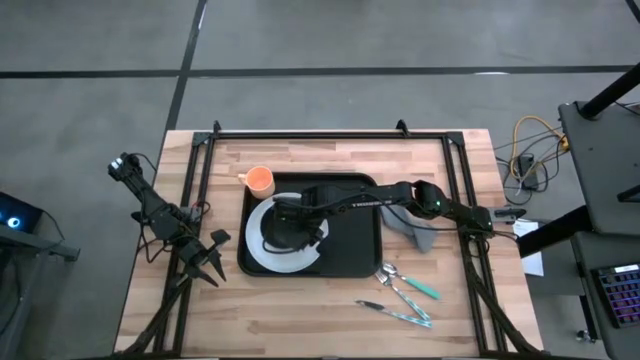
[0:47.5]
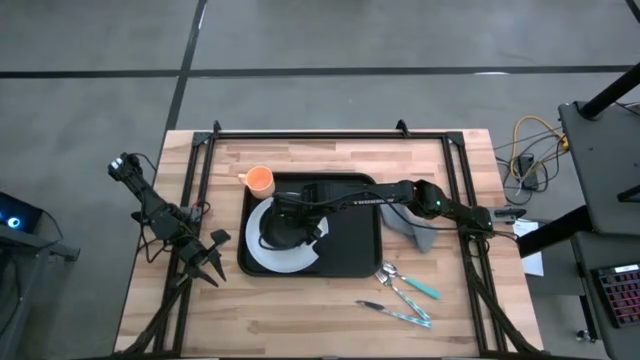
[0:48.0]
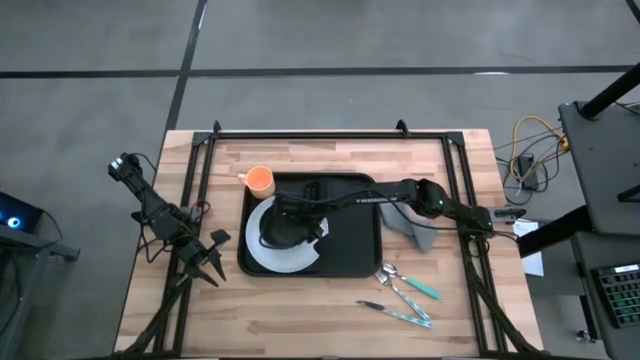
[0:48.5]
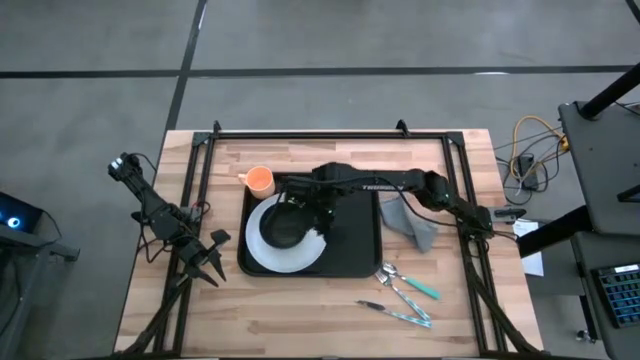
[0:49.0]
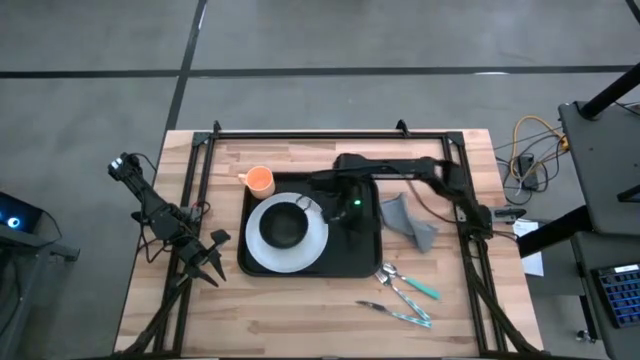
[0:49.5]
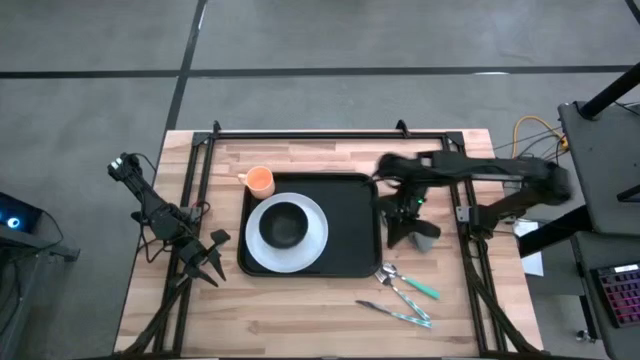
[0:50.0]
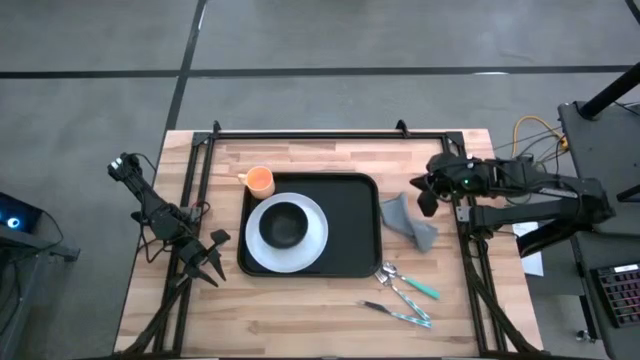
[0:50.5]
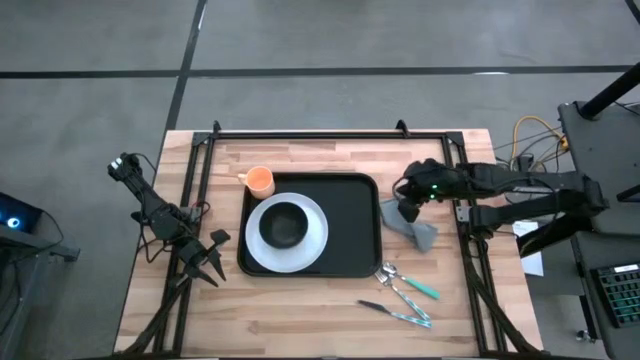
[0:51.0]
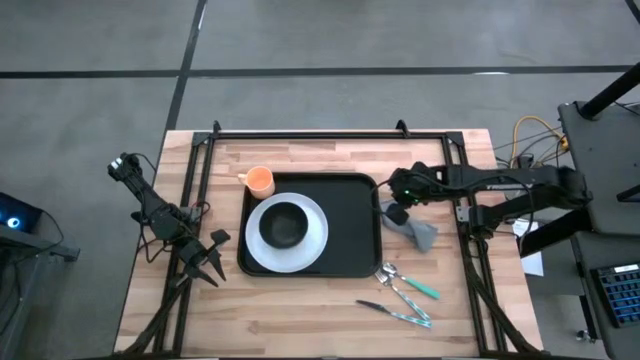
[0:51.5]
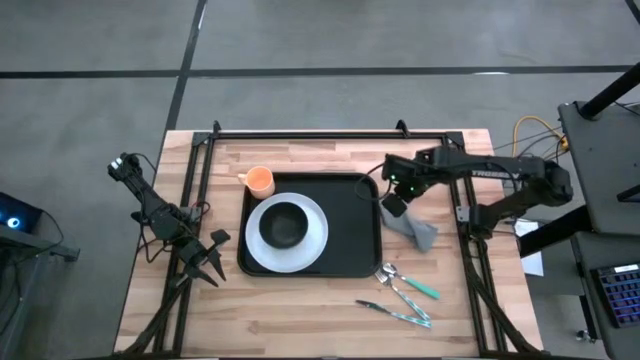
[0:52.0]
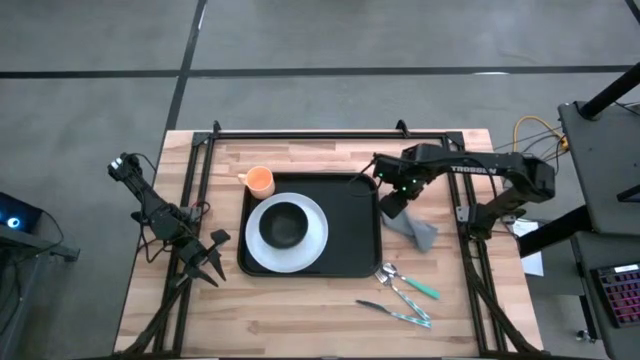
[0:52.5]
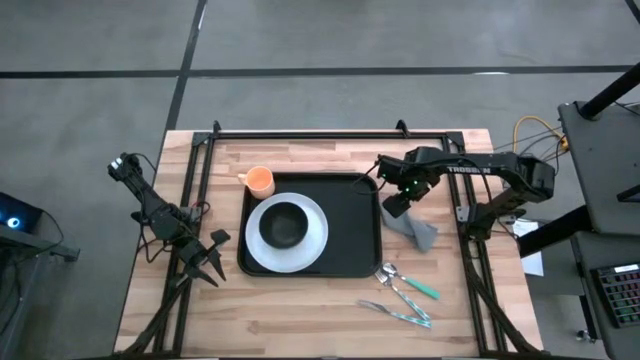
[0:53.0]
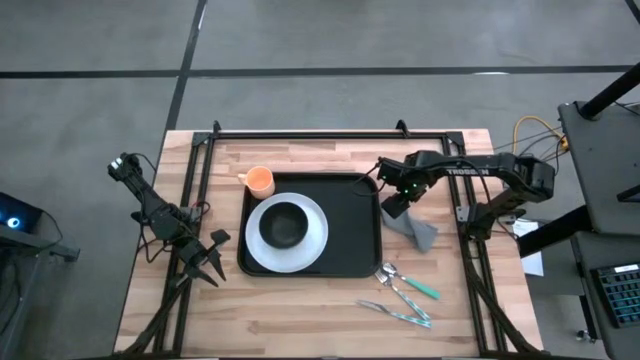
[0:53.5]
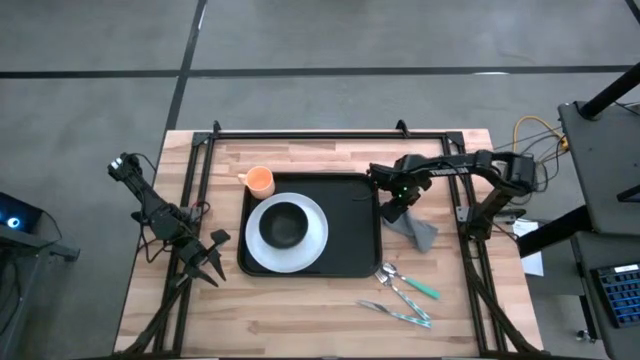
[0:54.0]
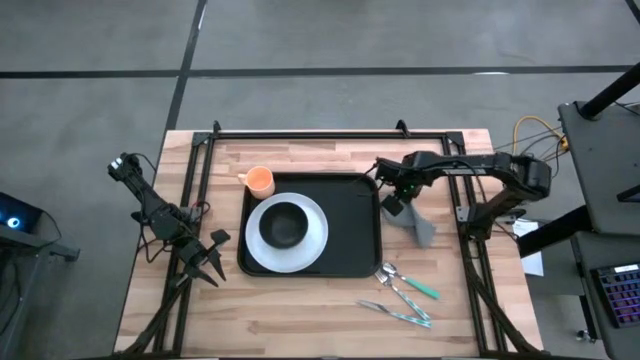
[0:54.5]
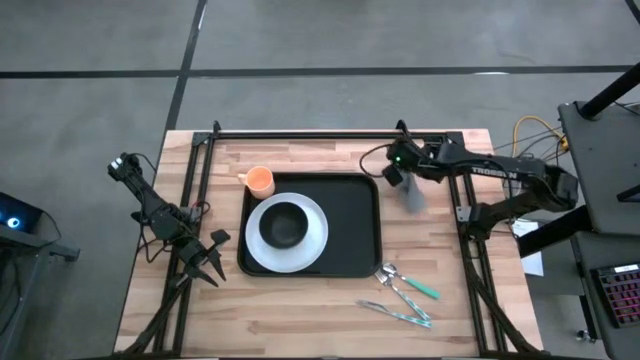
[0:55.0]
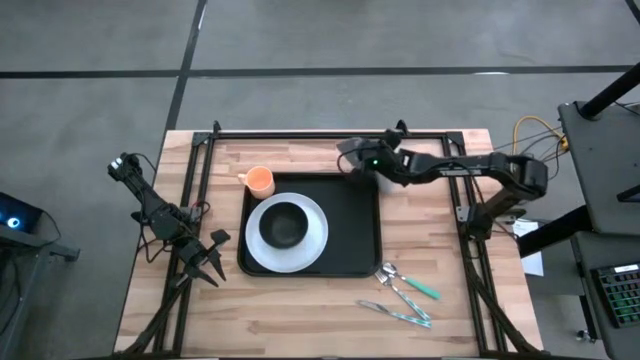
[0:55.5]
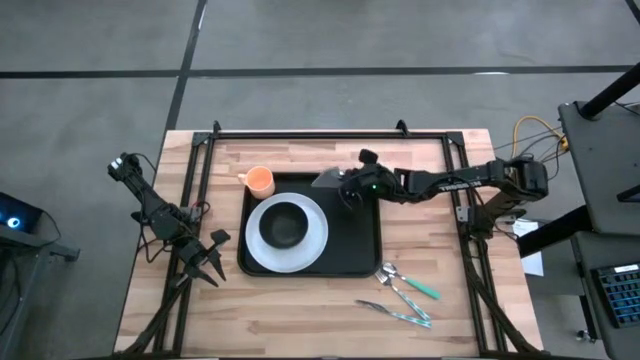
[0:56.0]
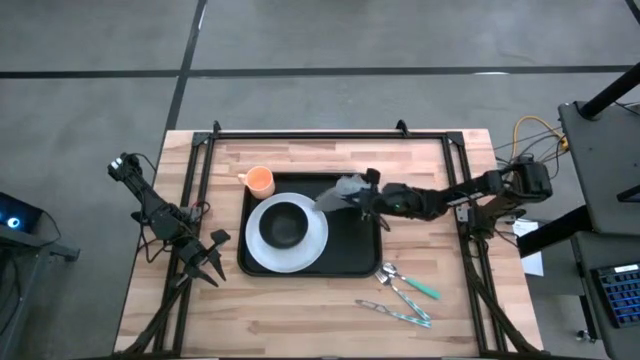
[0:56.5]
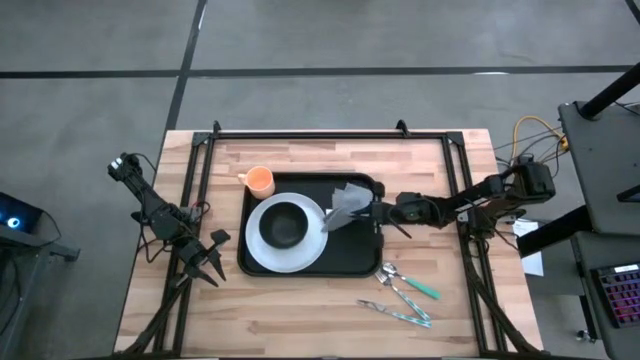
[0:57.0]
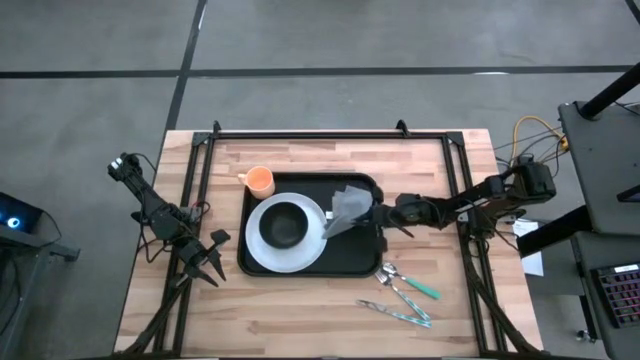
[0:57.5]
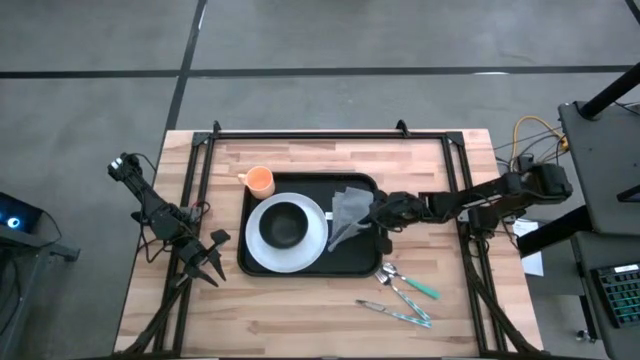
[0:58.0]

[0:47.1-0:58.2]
Task: Set up tray
Put the napkin on the tray to the right of the plate

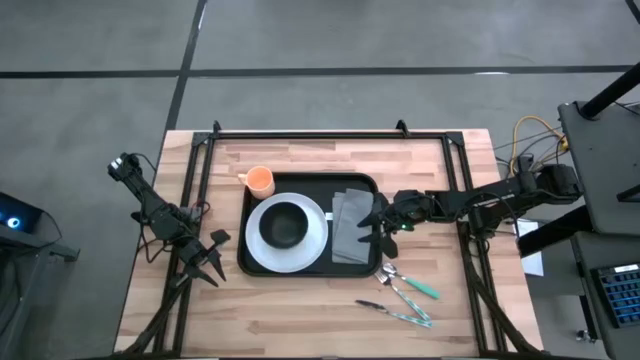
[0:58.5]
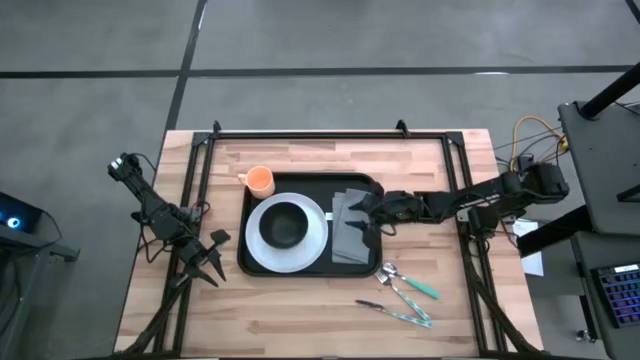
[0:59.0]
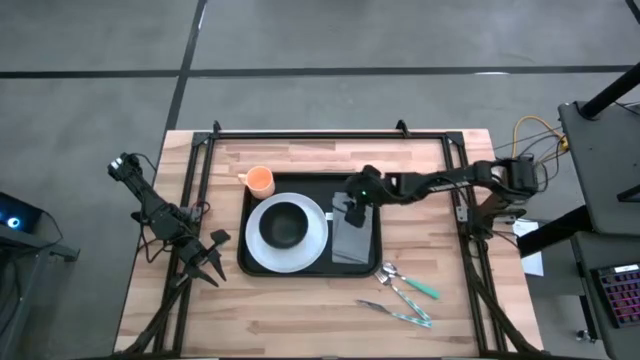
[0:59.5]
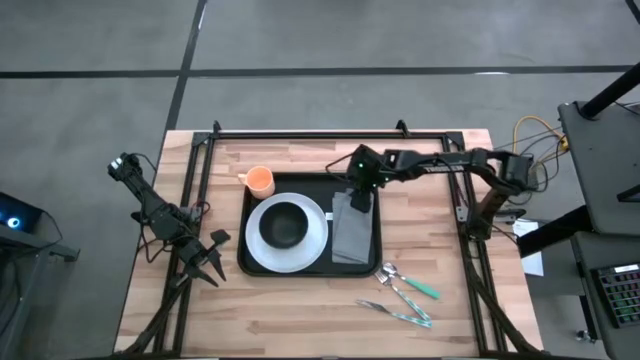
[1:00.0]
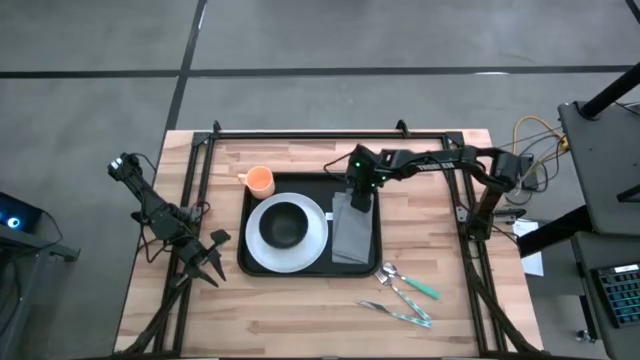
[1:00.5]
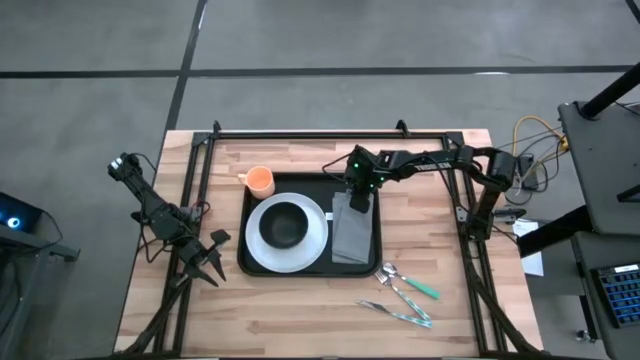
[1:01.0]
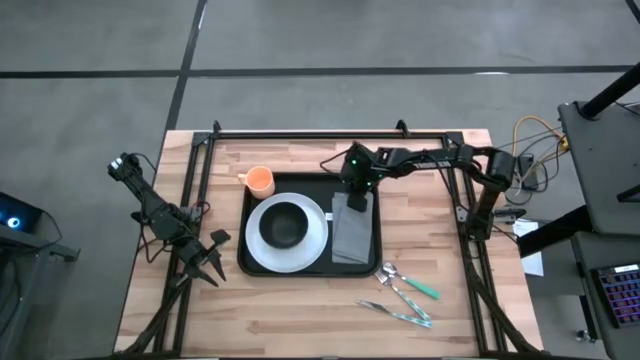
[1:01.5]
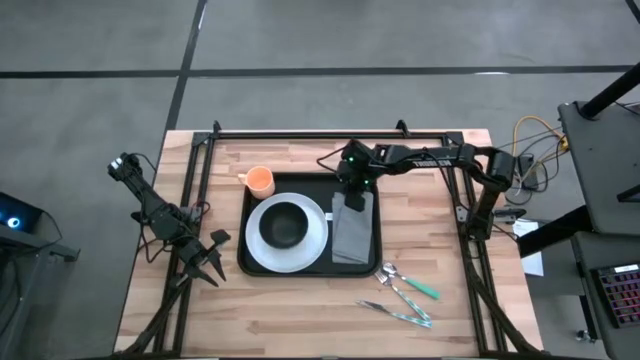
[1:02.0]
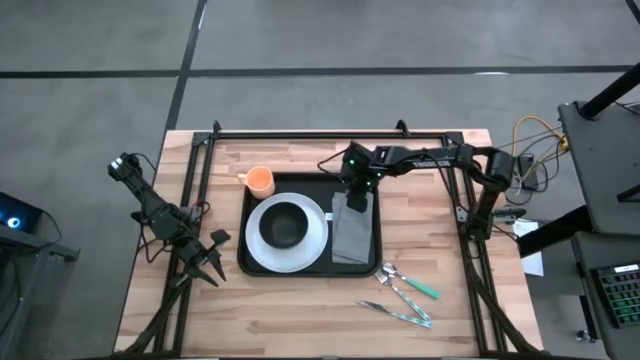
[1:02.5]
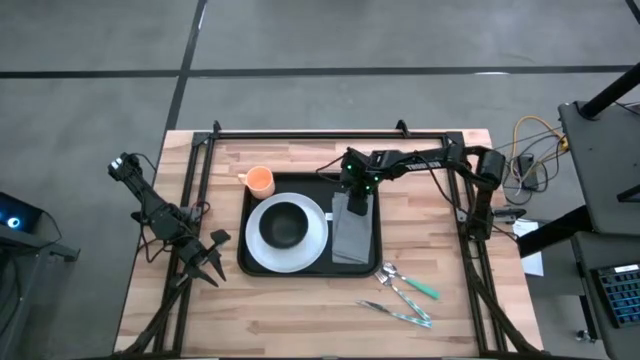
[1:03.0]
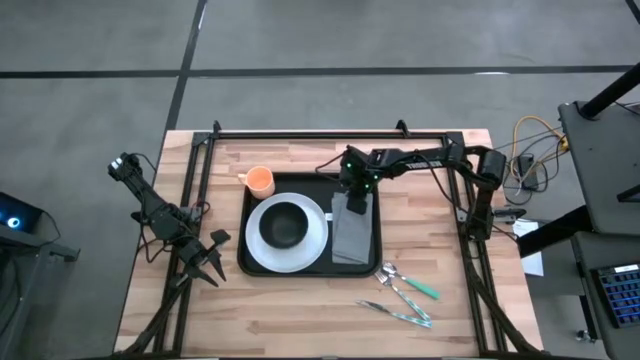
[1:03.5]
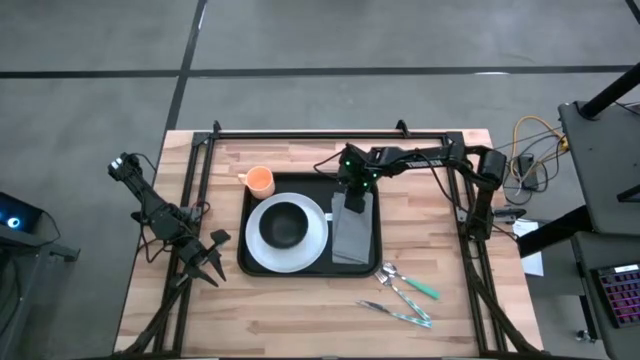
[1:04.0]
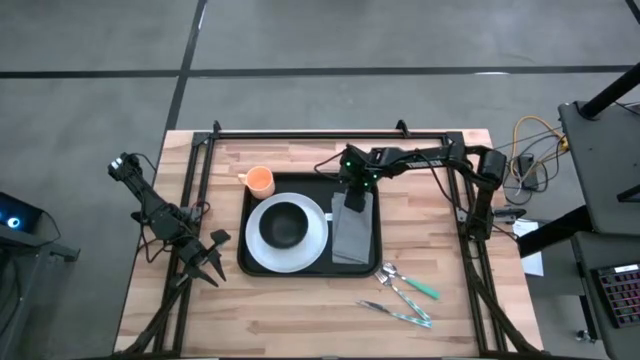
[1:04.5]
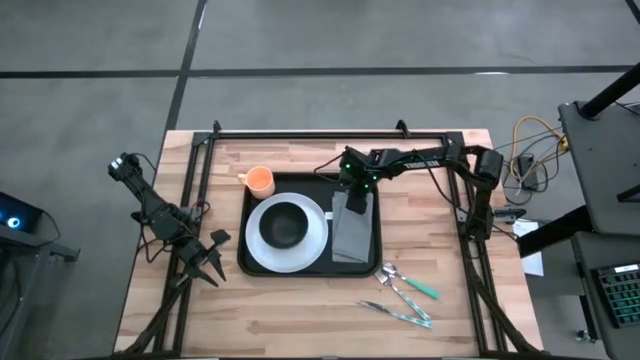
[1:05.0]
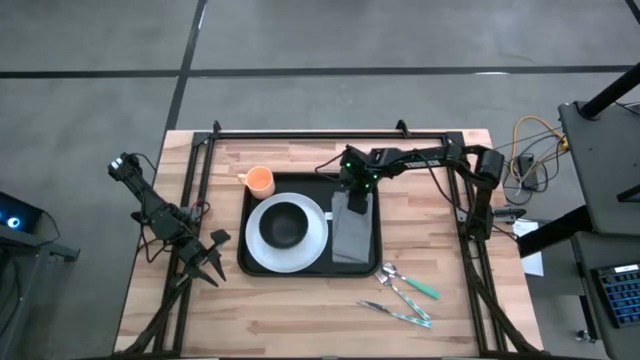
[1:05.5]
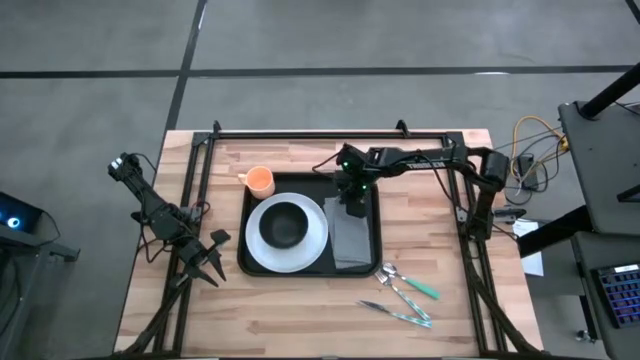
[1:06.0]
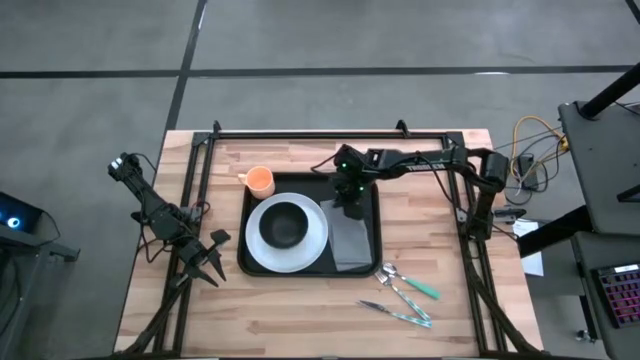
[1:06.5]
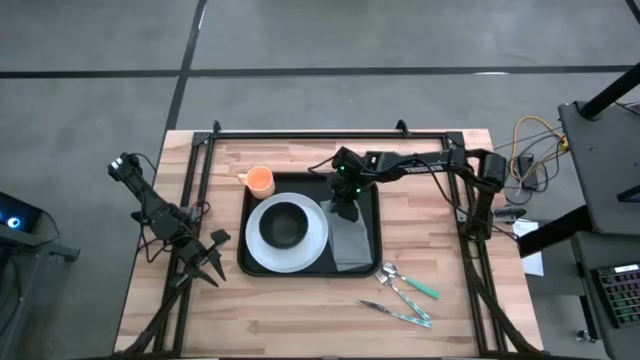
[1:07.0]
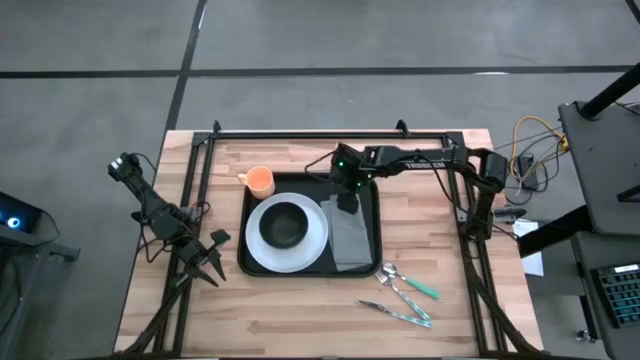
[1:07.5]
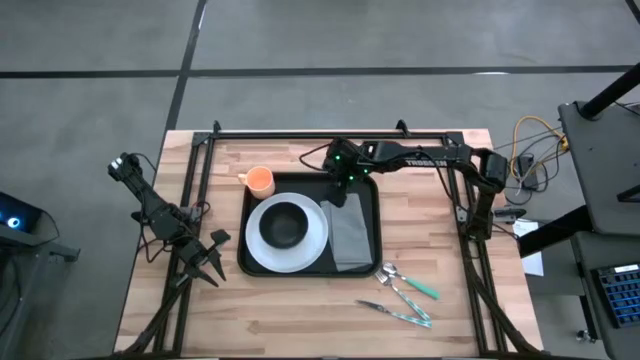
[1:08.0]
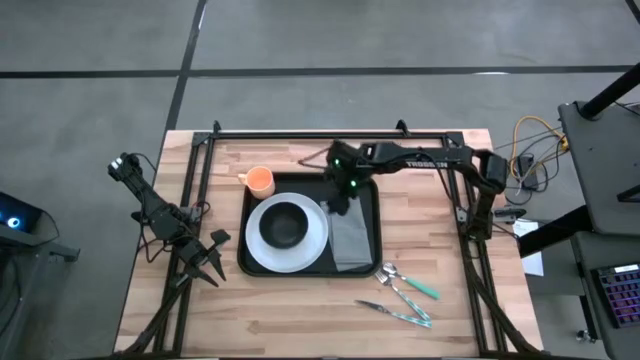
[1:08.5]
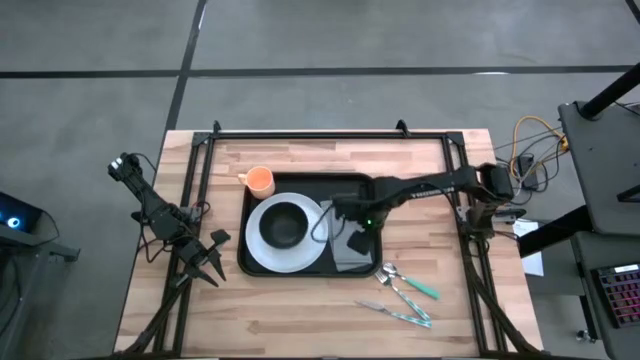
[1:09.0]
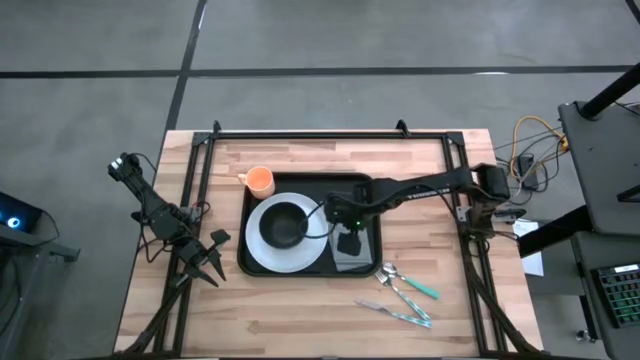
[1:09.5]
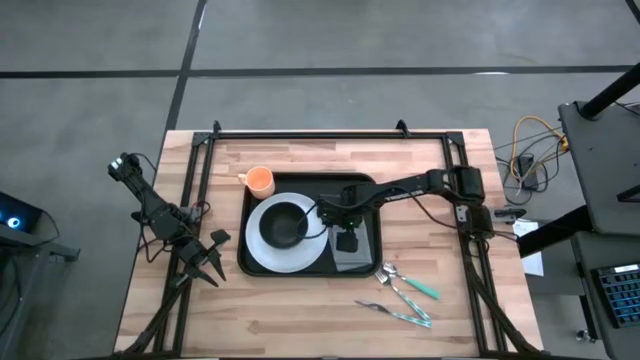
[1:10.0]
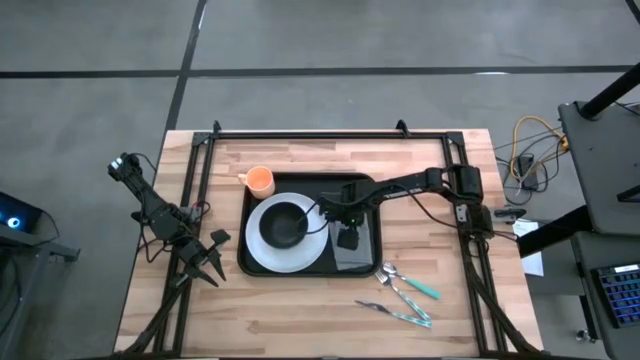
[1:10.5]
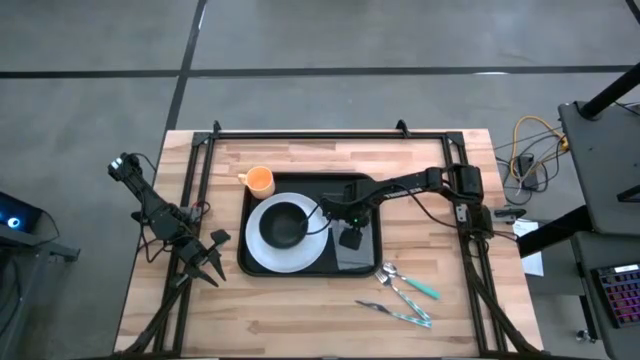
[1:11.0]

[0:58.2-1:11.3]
Adjust the napkin on the serving tray to fix the position
